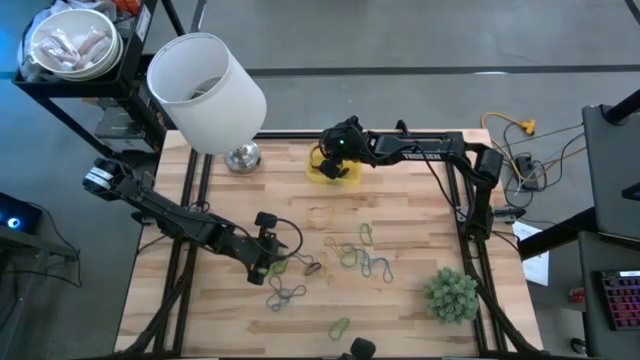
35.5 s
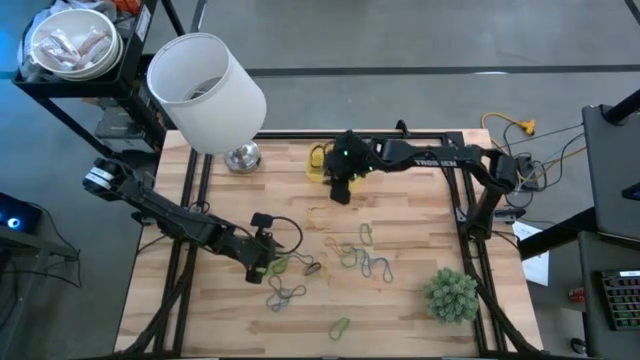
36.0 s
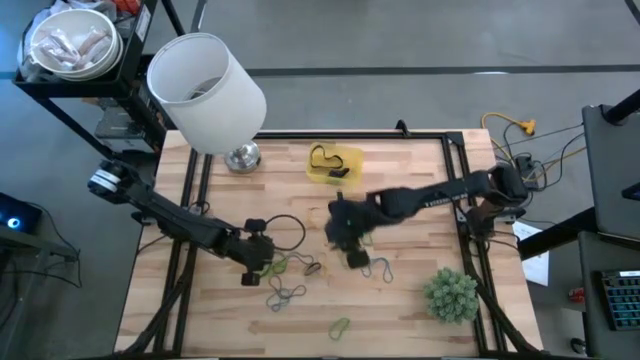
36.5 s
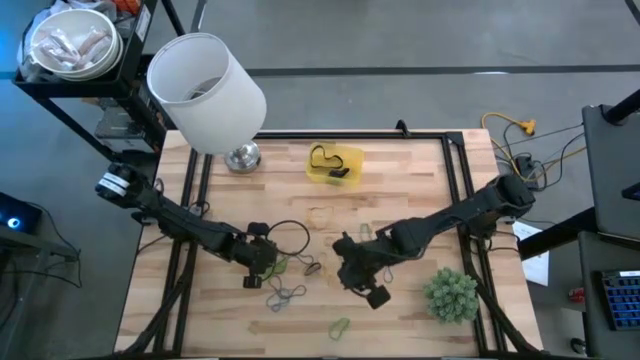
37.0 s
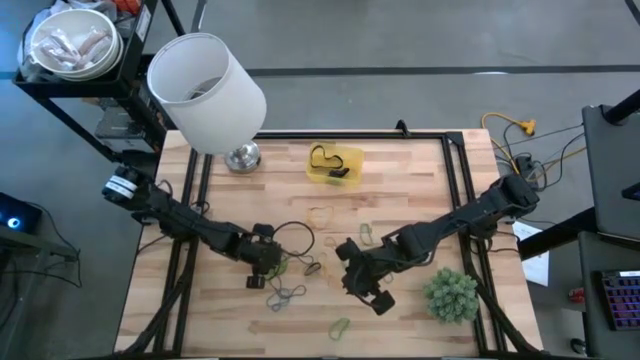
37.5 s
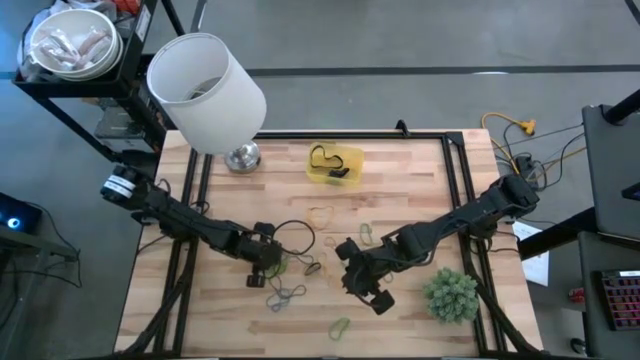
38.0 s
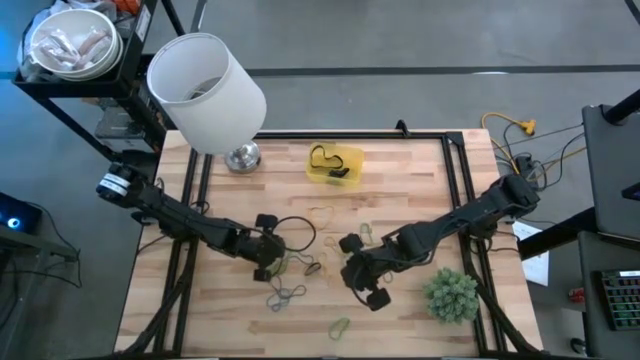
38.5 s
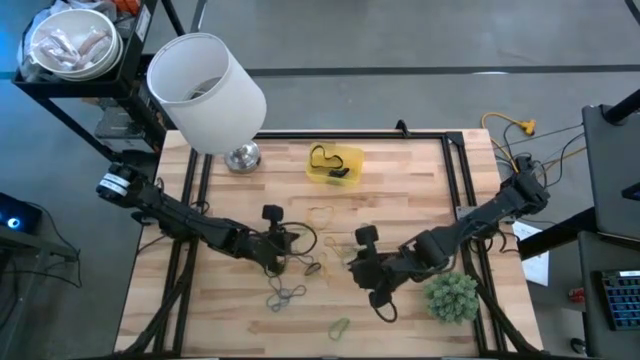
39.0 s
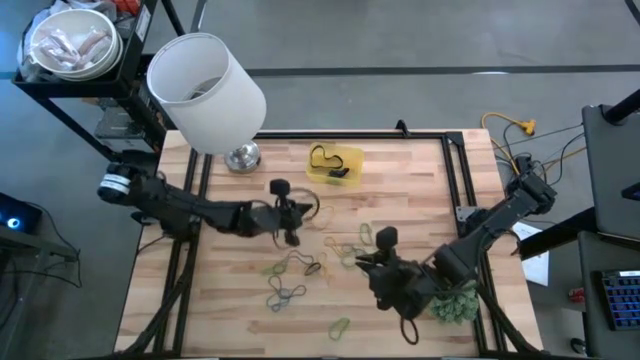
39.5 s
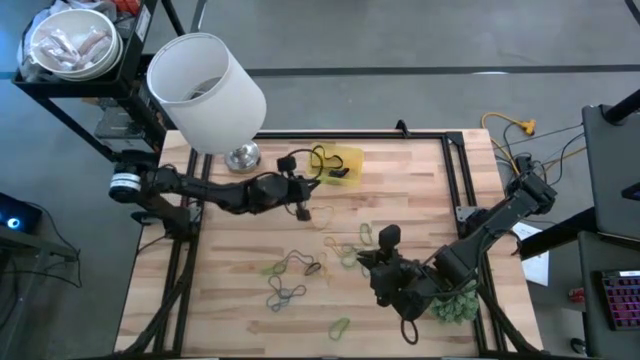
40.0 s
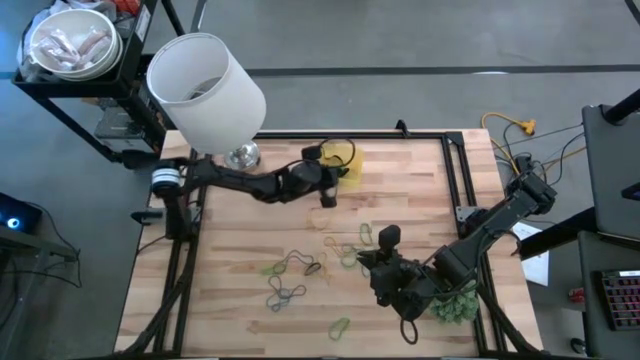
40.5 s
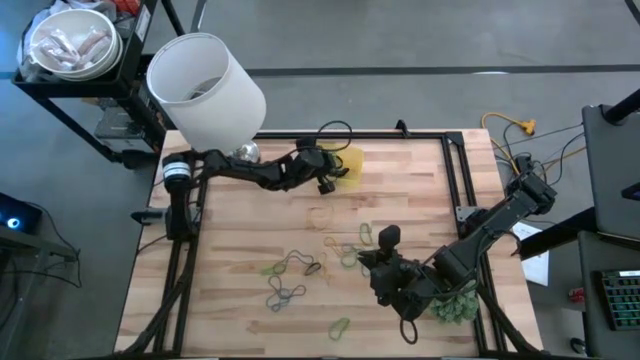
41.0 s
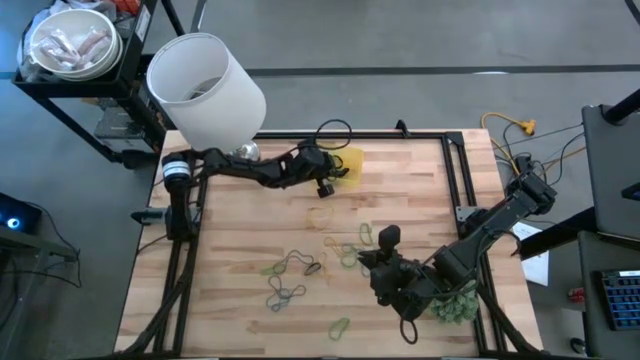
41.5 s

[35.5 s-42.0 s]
Task: Pick and place rubber bands into bin
Put the green rubber band into the yellow bin

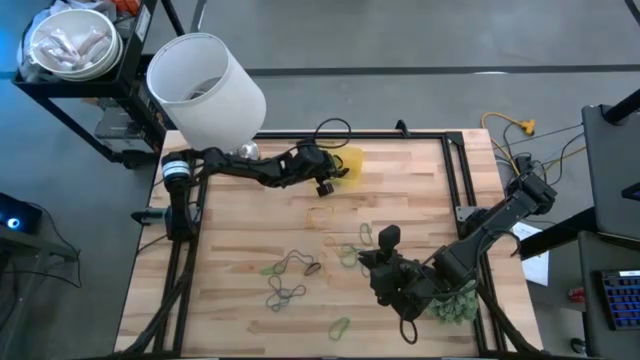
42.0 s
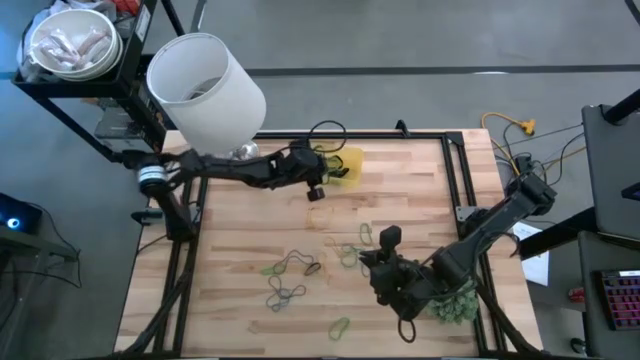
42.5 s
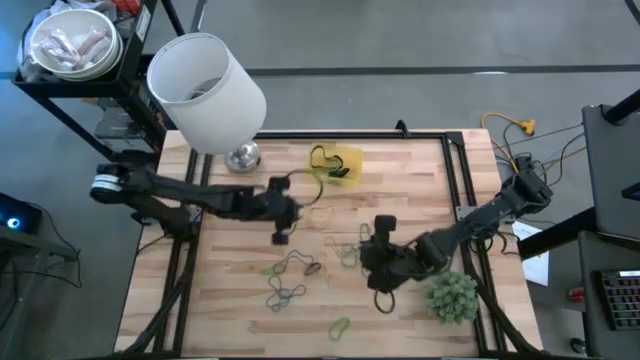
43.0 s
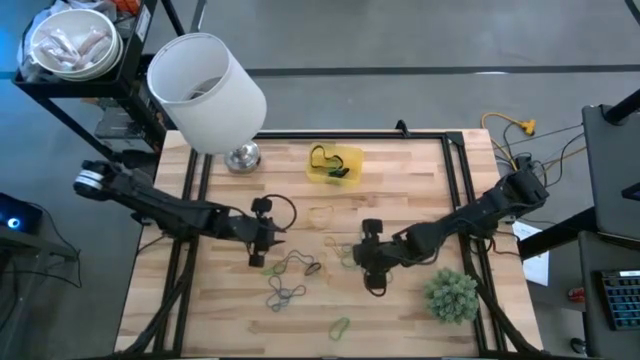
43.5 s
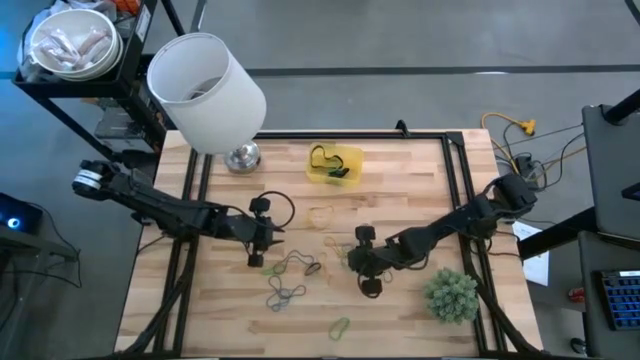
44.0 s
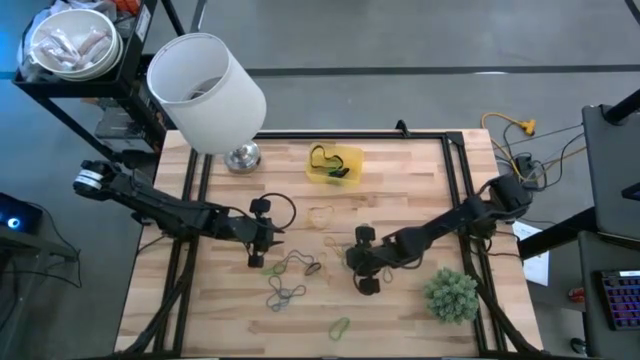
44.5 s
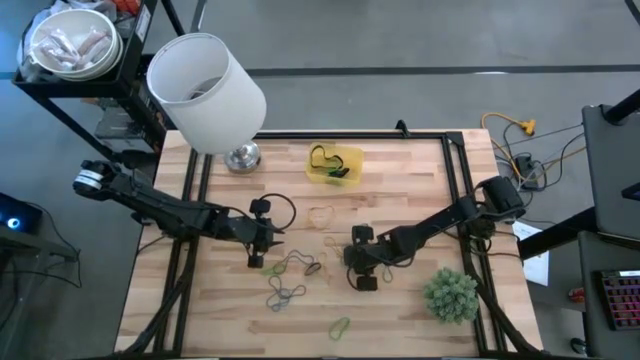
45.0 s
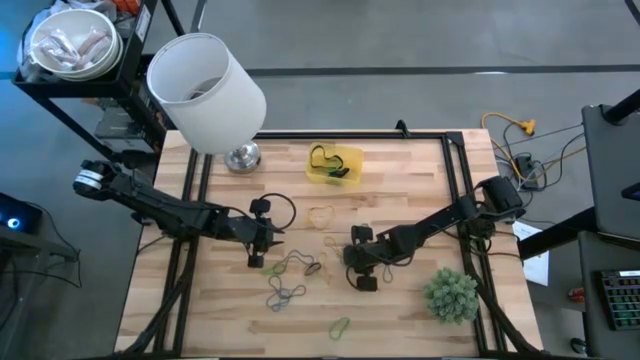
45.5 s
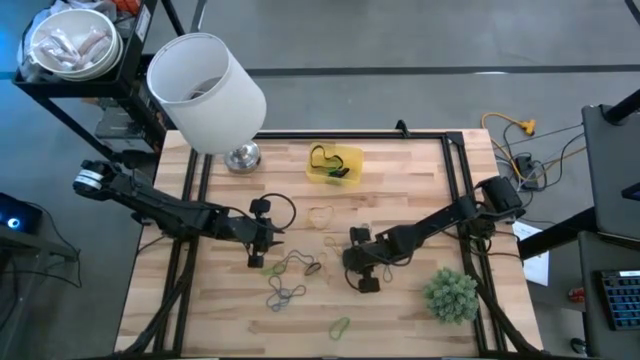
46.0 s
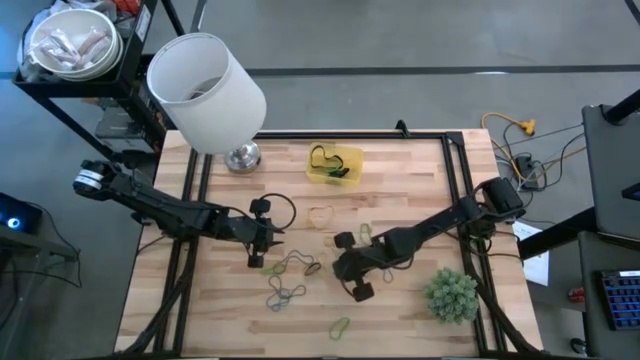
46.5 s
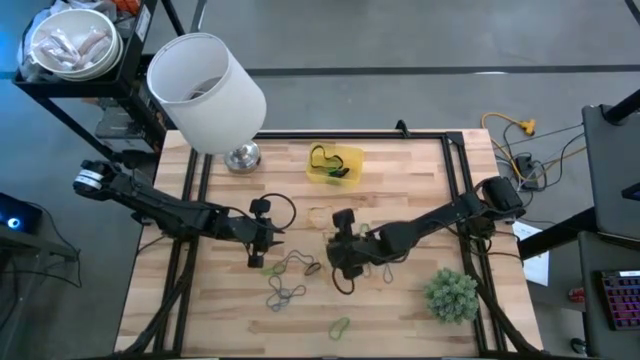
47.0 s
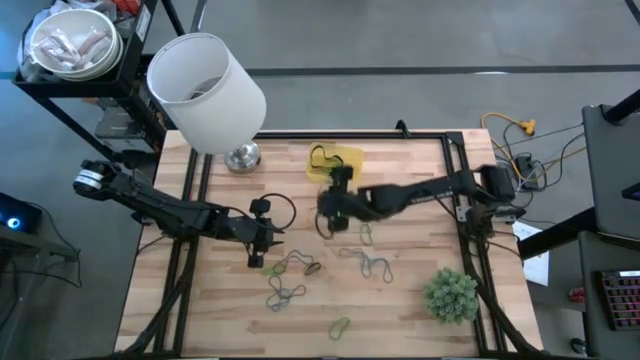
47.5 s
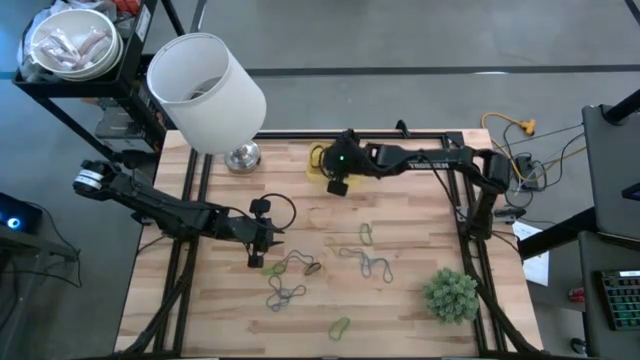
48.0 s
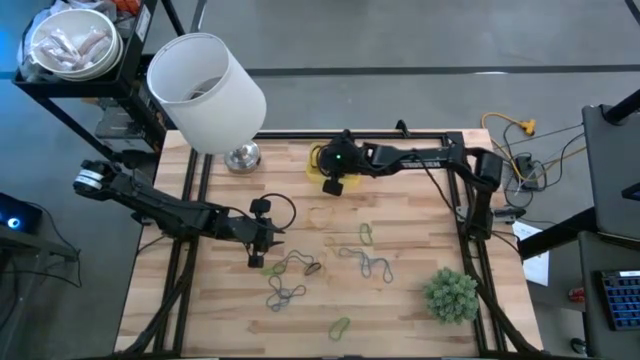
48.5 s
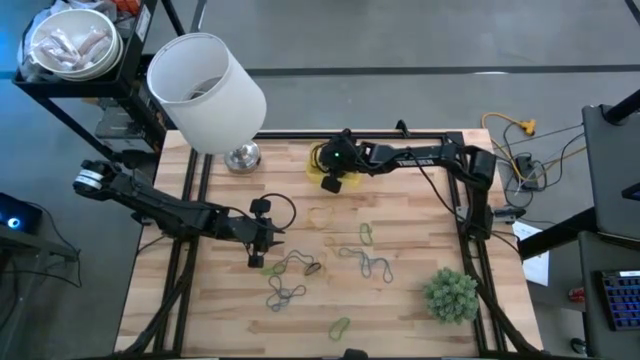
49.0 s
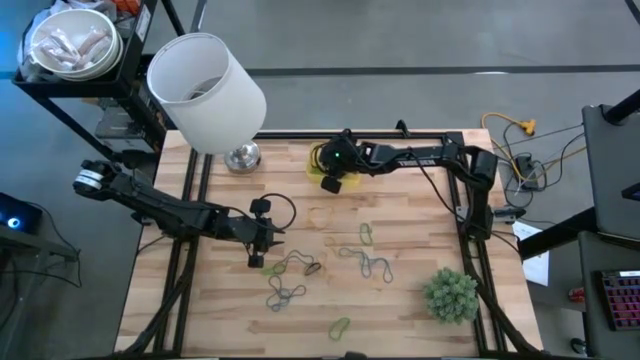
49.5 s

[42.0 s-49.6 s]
Put the green rubber band into the yellow bin

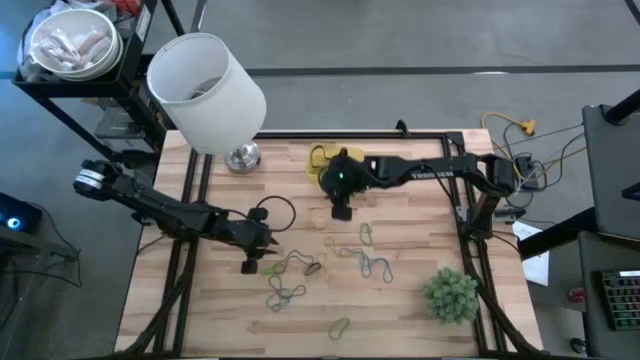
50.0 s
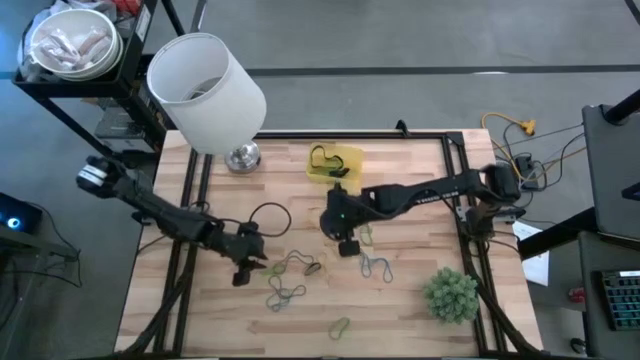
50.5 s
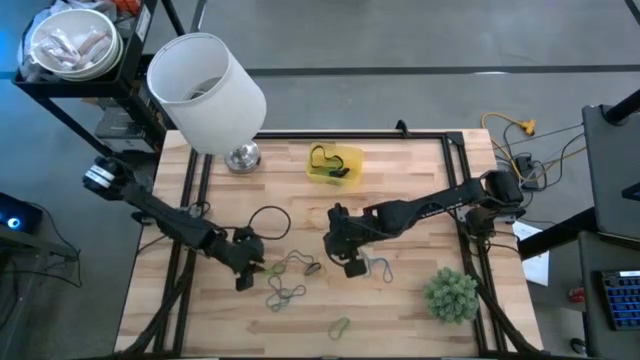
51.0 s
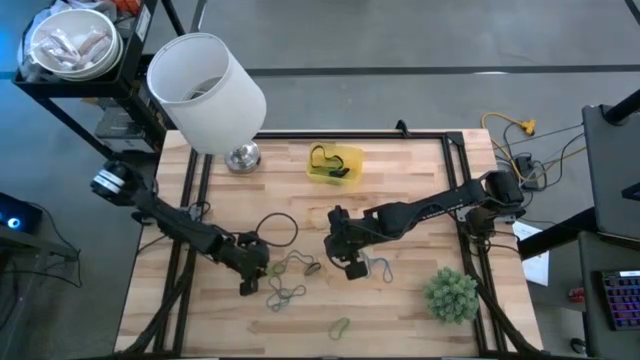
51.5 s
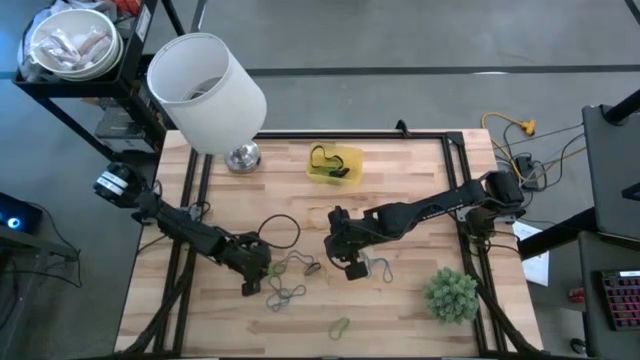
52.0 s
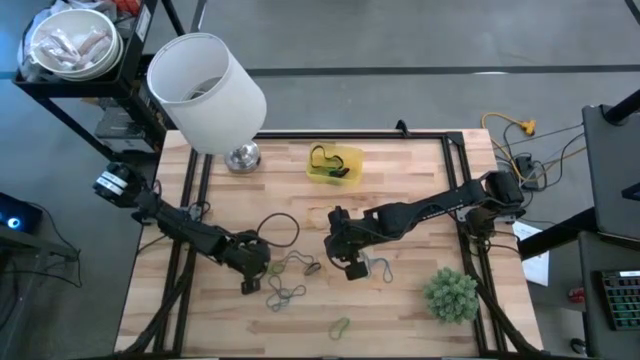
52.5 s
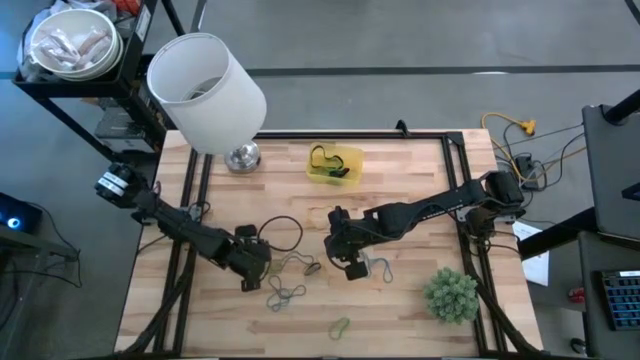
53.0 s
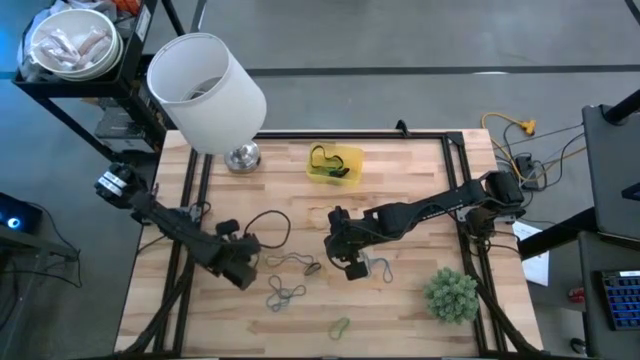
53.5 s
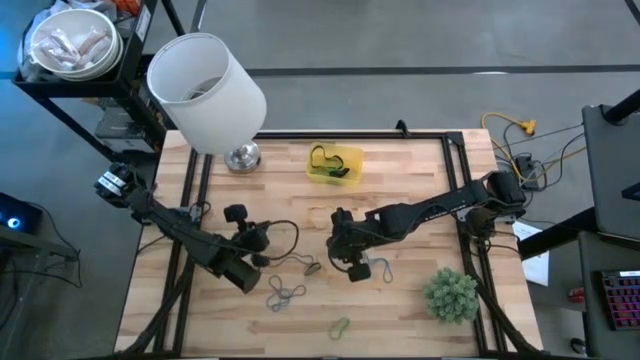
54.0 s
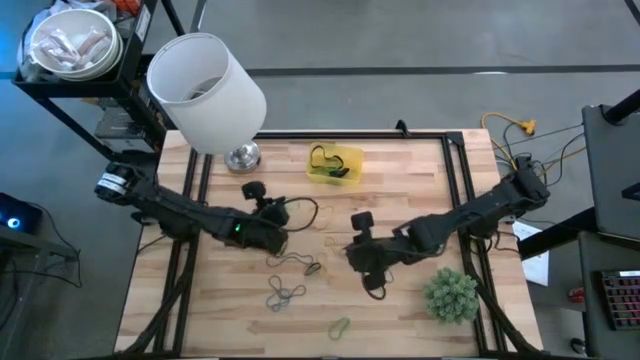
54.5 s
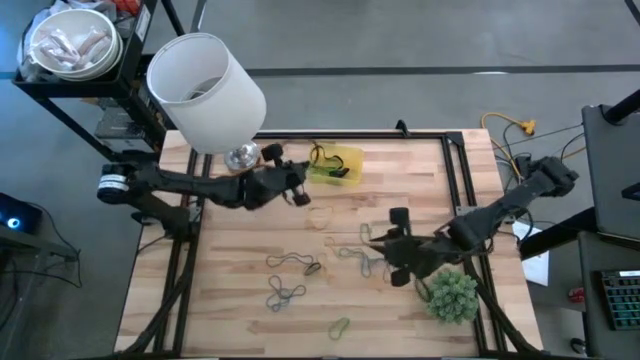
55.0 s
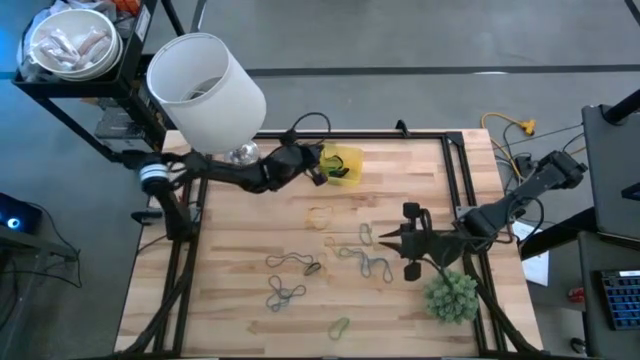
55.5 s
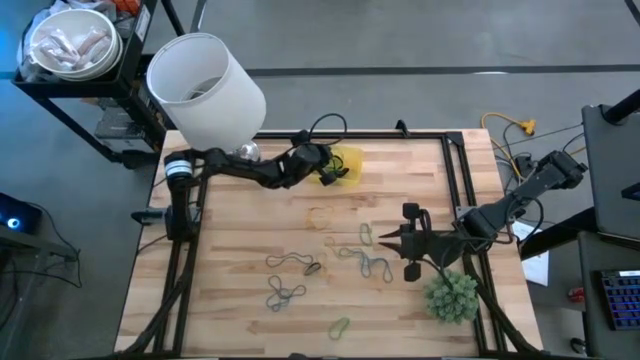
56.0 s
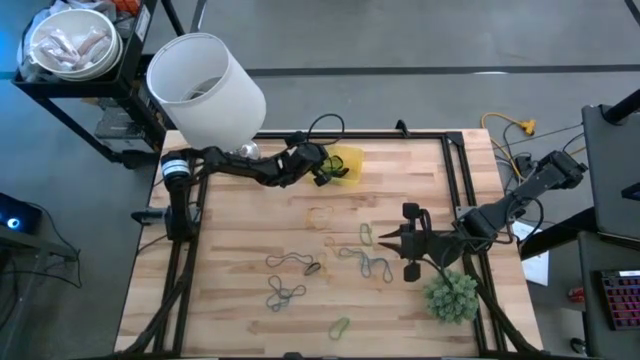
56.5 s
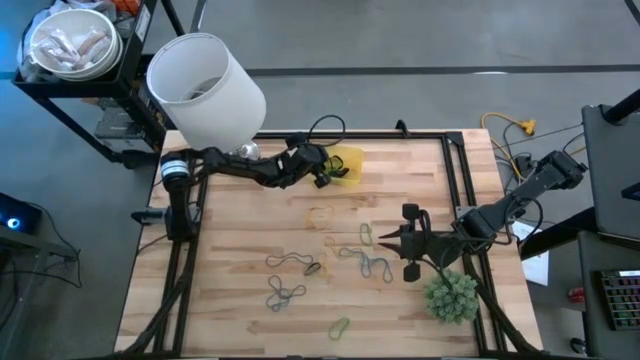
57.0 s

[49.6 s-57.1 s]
Put the green rubber band into the yellow bin
